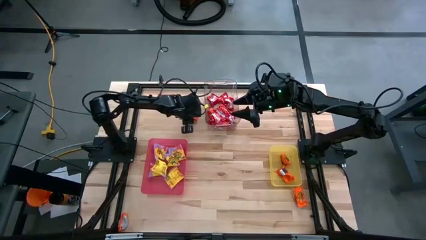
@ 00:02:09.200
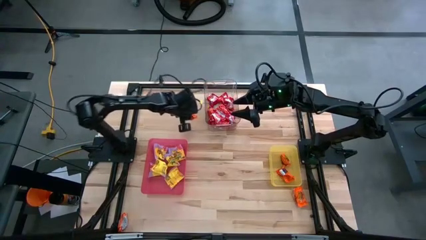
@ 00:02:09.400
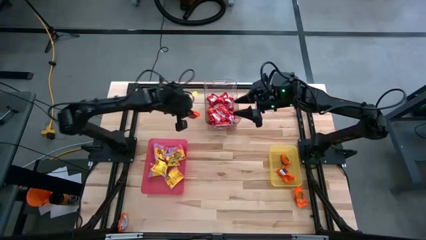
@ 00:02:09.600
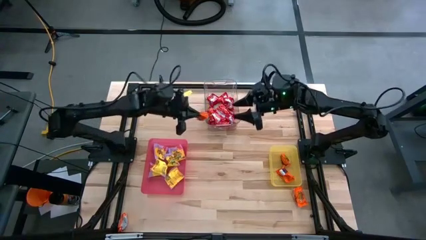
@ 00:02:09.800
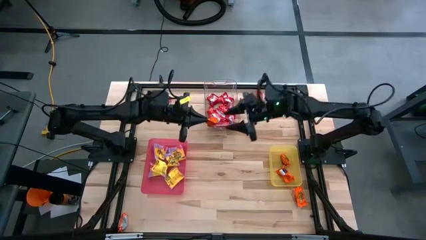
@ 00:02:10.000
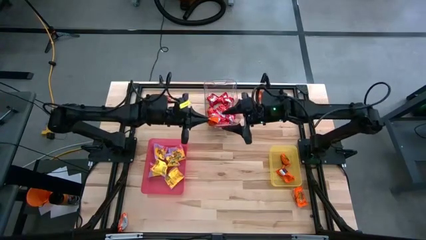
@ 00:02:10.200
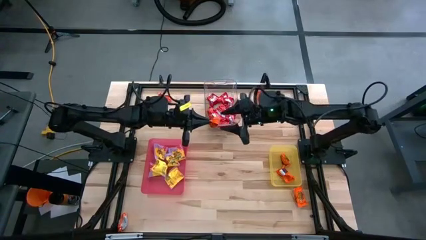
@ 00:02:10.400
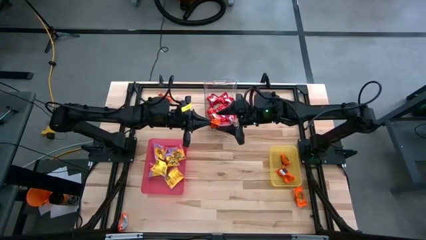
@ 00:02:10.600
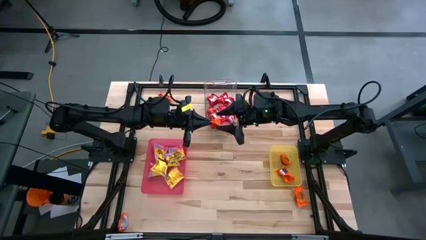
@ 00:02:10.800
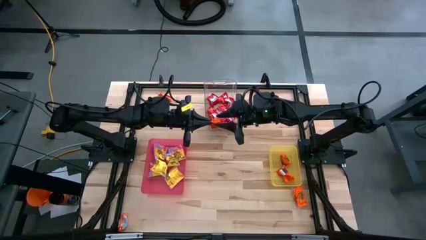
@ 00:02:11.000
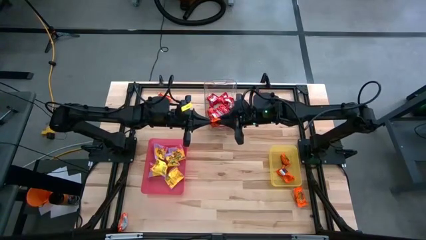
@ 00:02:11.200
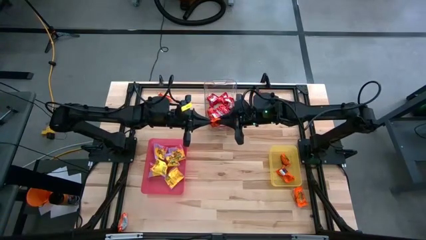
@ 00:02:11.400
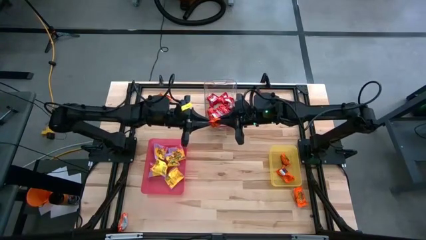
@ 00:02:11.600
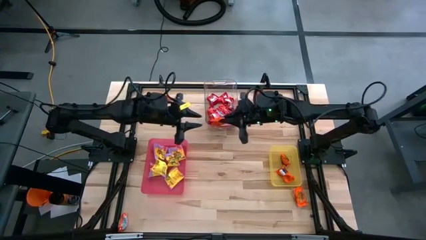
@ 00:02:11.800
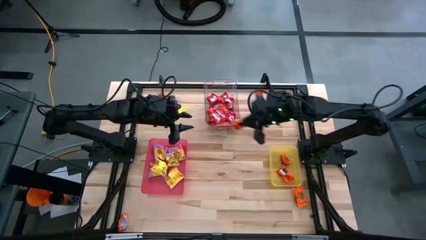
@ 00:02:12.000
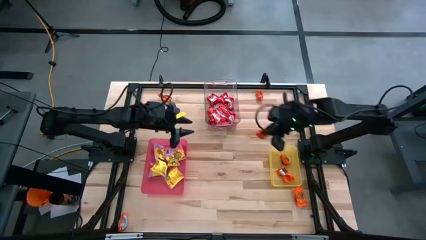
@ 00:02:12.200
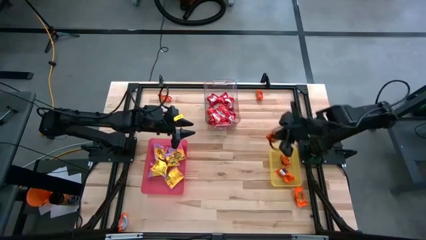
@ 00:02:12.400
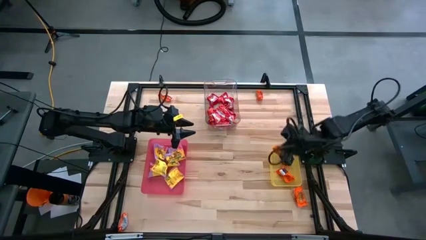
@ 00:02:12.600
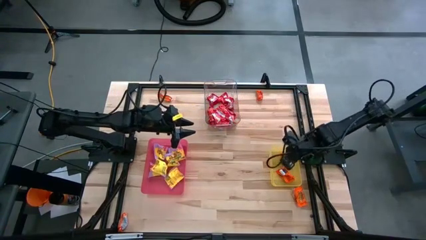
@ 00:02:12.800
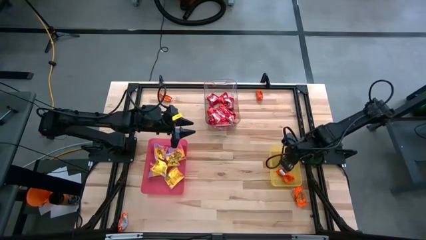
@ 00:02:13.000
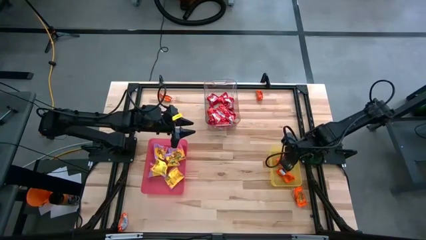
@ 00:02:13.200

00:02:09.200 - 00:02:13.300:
Task: Sort candy
Put the orange candy into the yellow bin

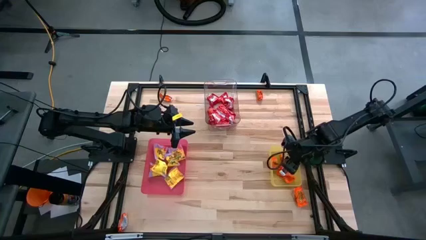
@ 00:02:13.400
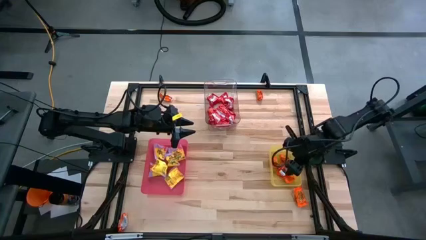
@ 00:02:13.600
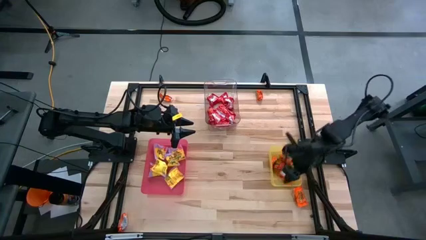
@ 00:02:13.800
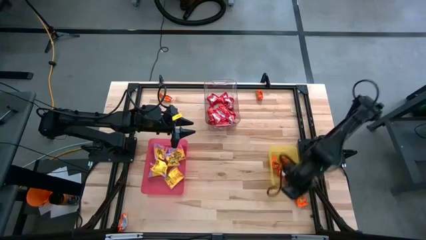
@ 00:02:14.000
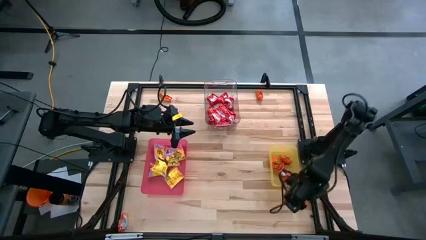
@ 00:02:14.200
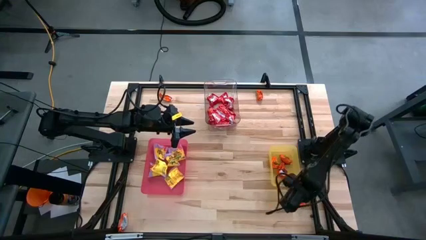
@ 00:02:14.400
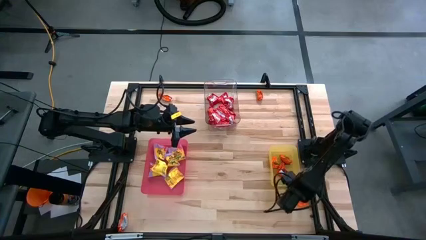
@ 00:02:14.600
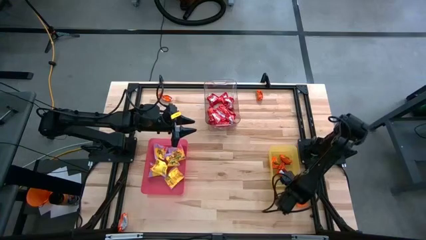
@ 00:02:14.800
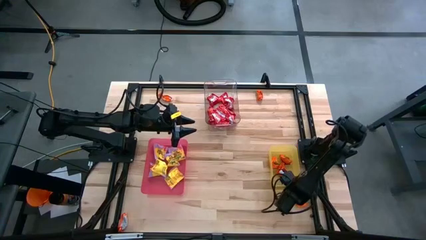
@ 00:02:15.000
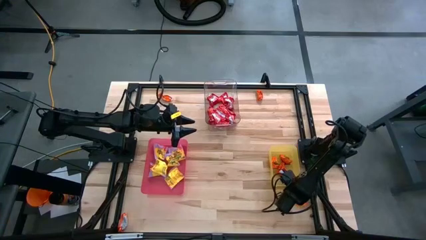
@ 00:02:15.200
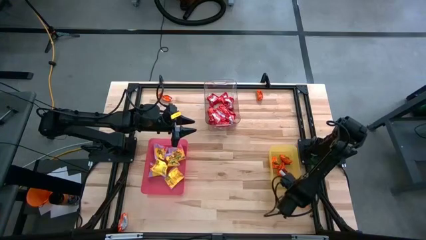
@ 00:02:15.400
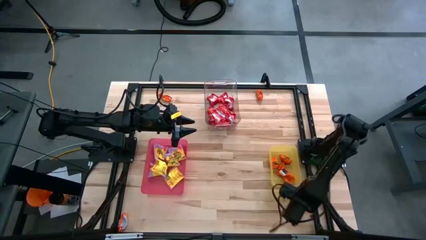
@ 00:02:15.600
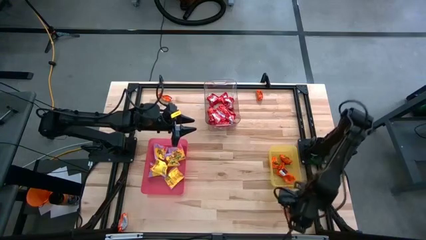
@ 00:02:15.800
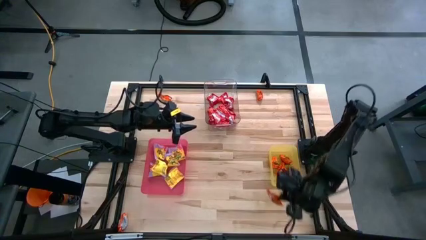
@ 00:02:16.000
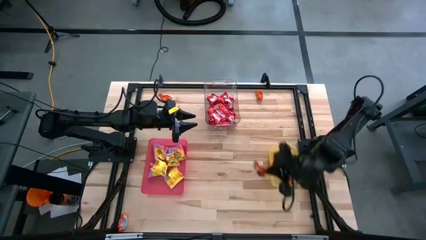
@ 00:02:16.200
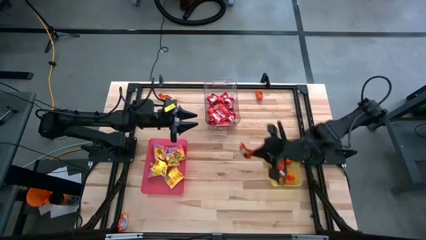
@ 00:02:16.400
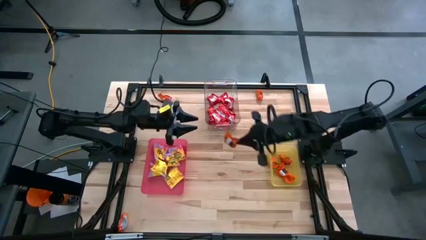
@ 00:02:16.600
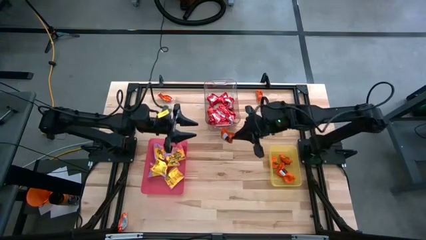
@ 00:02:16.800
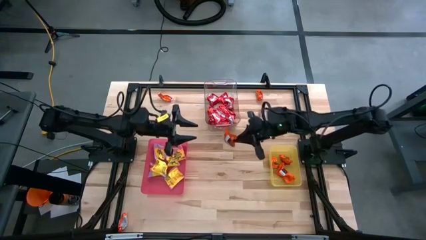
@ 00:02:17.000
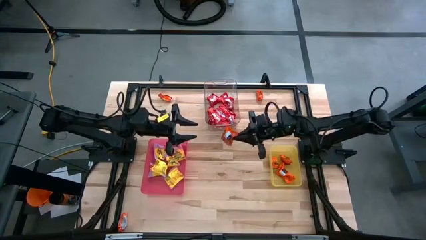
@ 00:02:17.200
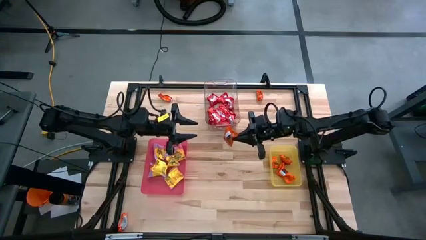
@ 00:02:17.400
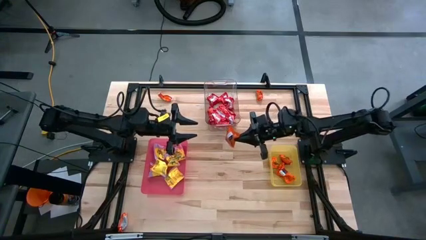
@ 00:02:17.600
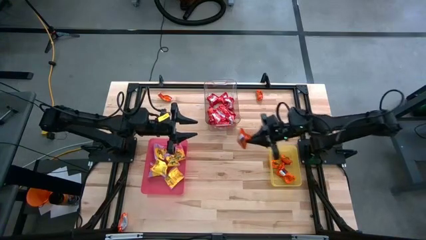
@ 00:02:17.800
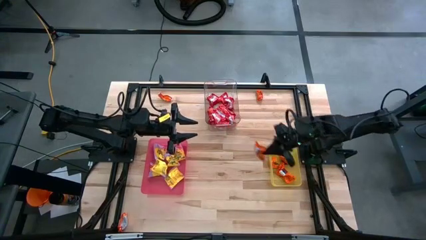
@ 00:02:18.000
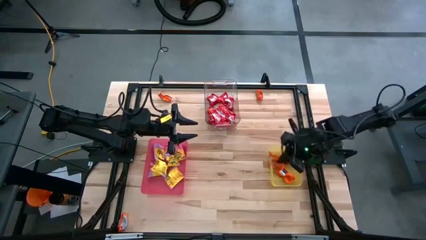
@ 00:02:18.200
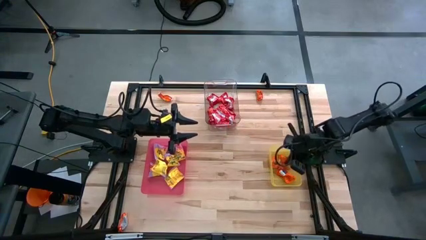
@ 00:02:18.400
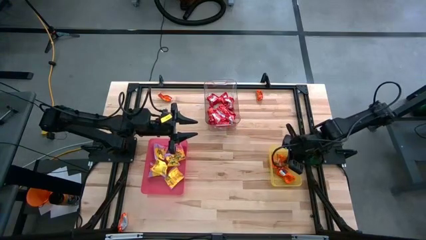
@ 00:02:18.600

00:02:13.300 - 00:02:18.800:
Put the orange candy into the yellow bin
